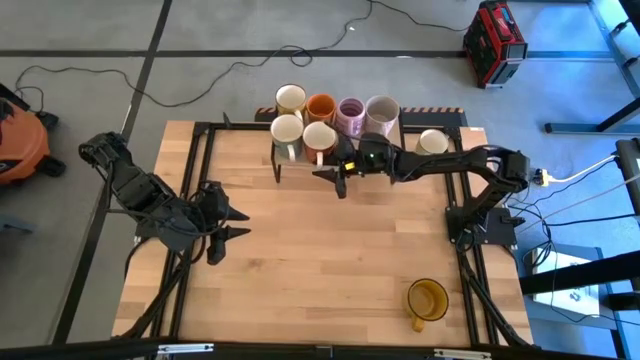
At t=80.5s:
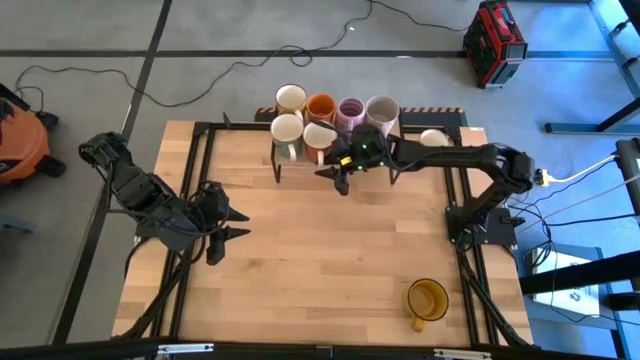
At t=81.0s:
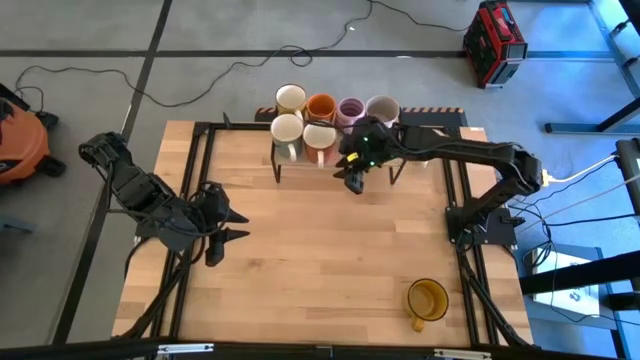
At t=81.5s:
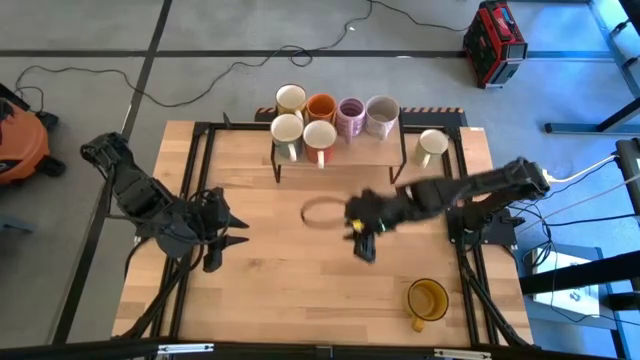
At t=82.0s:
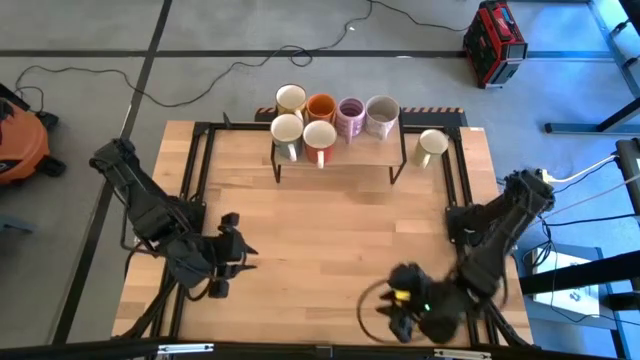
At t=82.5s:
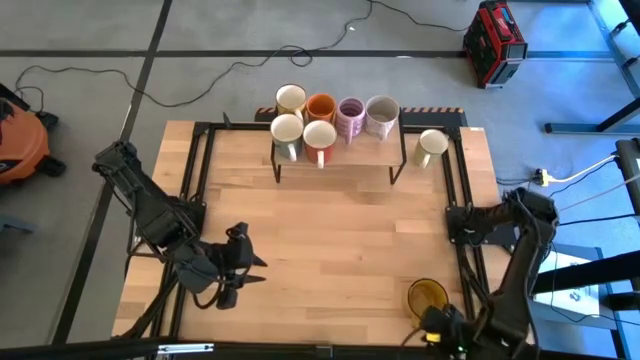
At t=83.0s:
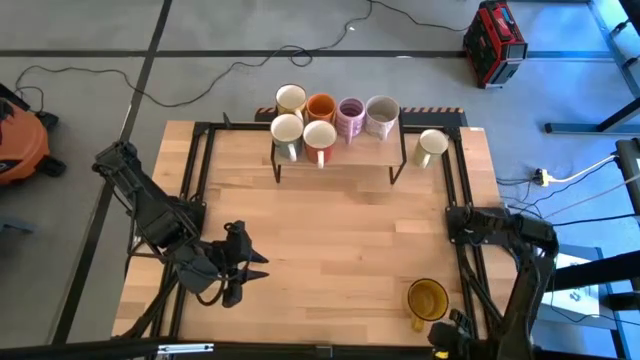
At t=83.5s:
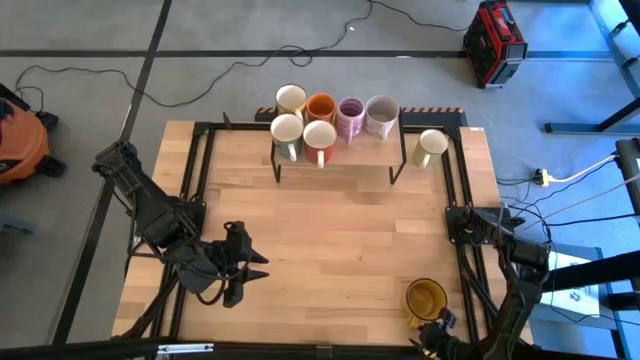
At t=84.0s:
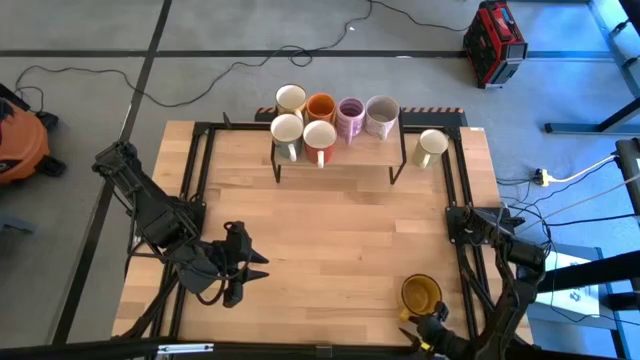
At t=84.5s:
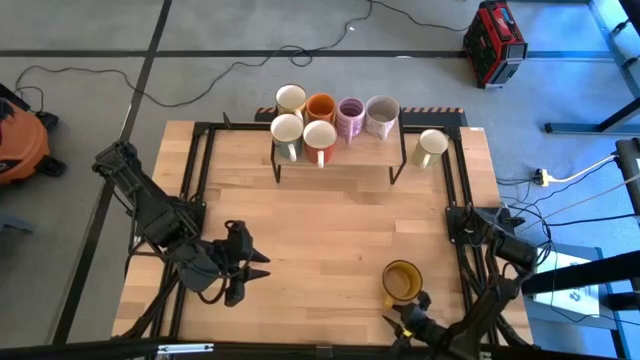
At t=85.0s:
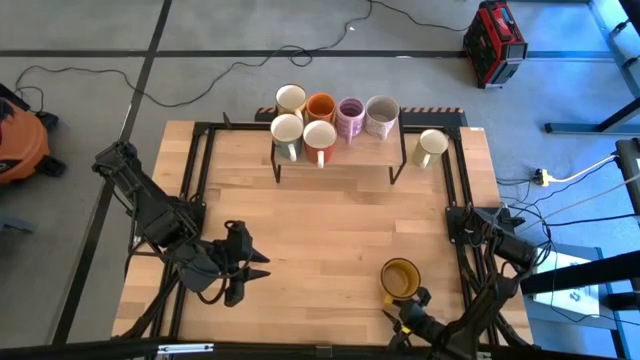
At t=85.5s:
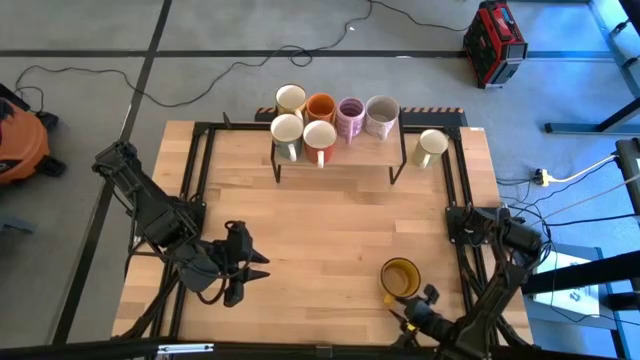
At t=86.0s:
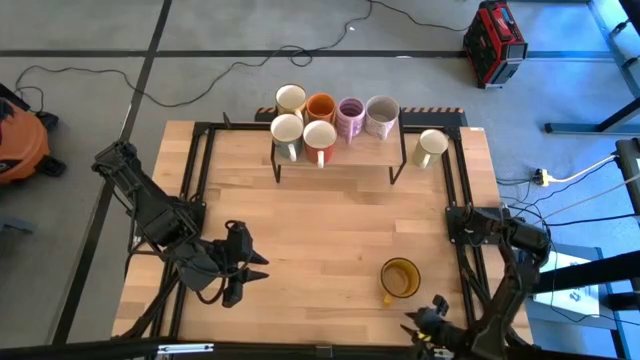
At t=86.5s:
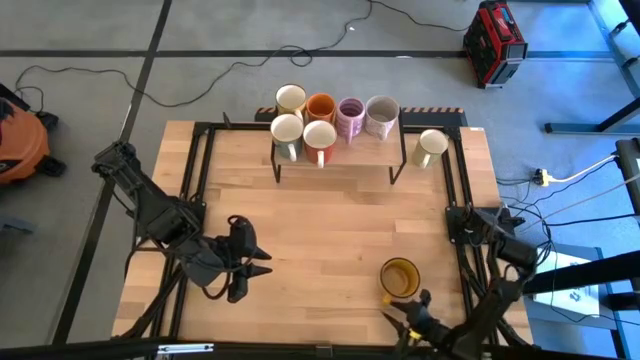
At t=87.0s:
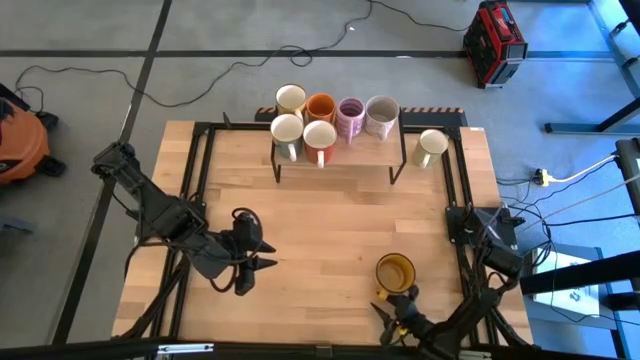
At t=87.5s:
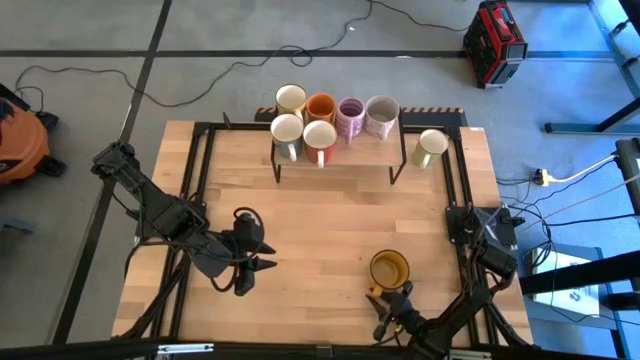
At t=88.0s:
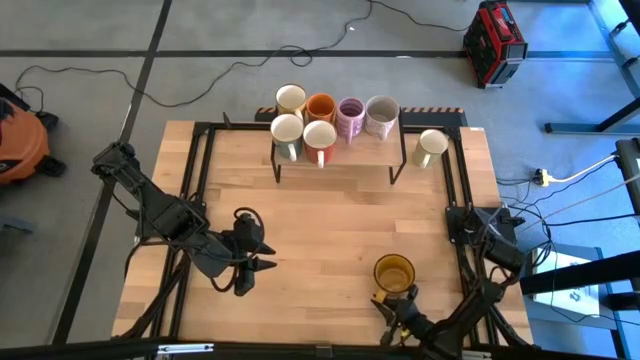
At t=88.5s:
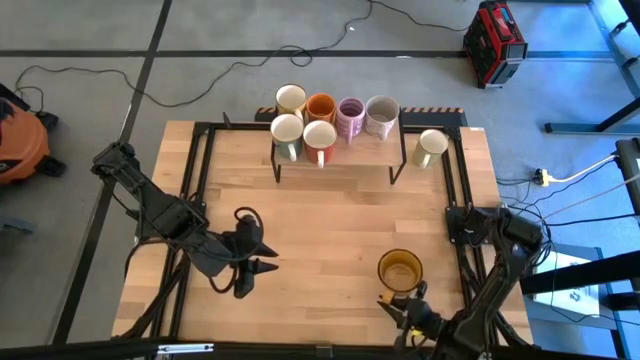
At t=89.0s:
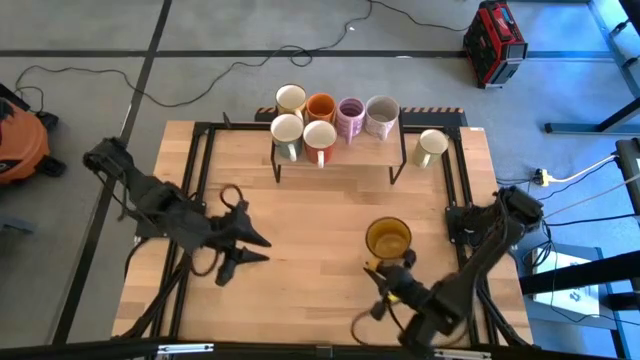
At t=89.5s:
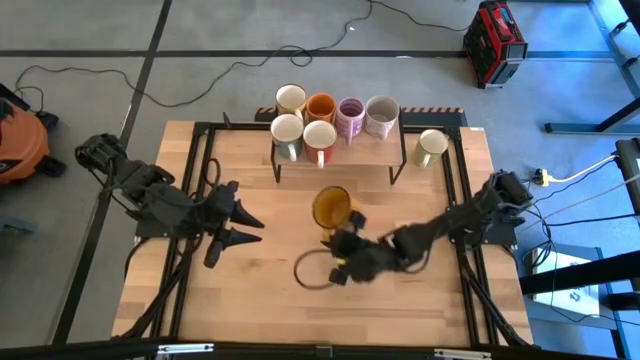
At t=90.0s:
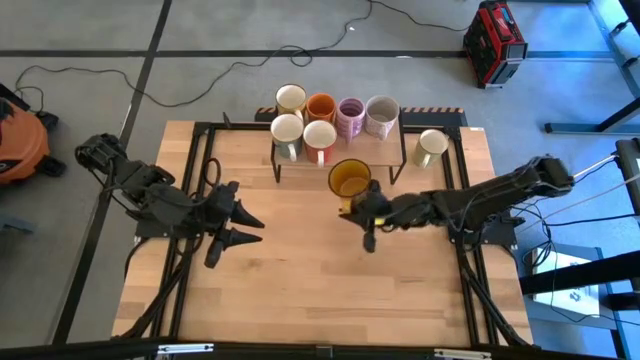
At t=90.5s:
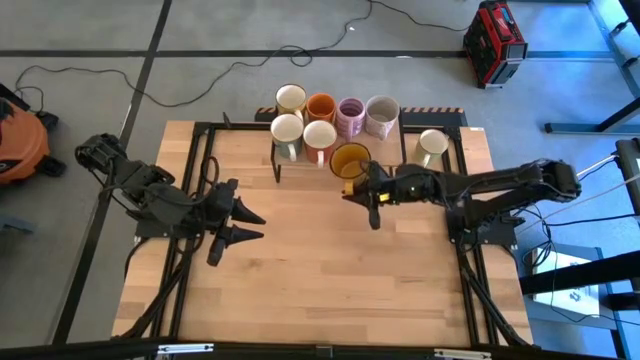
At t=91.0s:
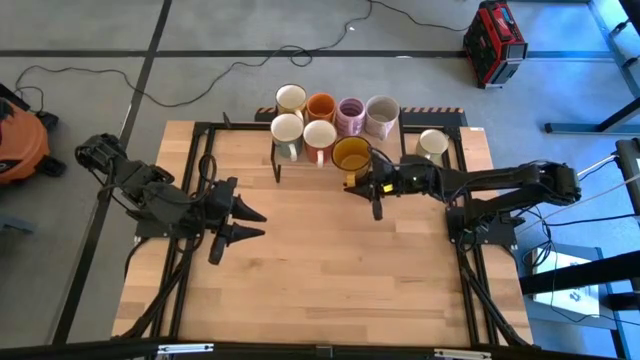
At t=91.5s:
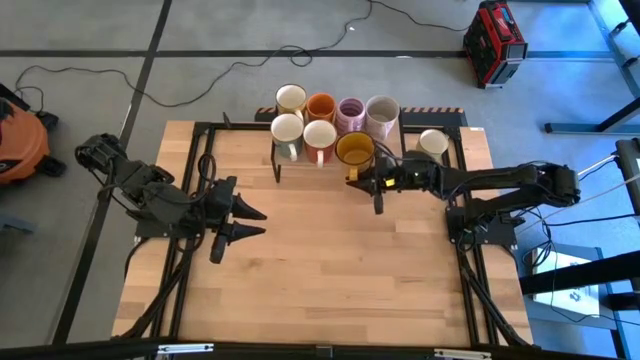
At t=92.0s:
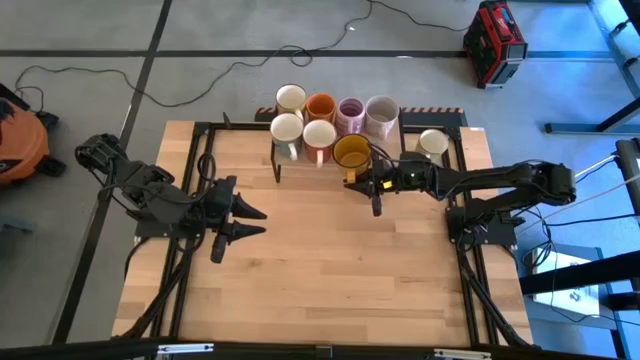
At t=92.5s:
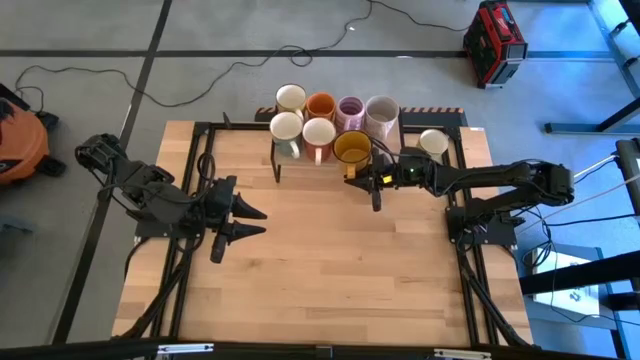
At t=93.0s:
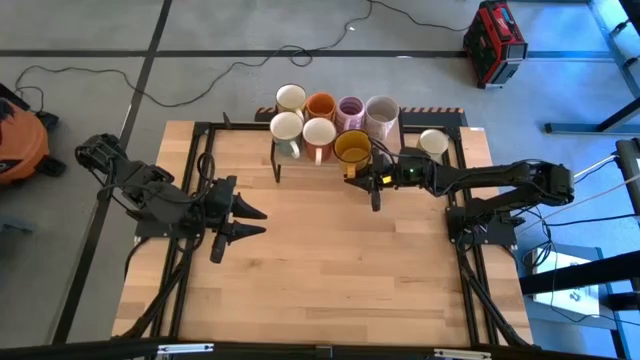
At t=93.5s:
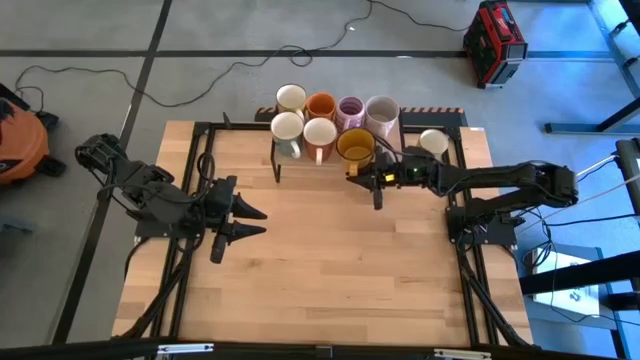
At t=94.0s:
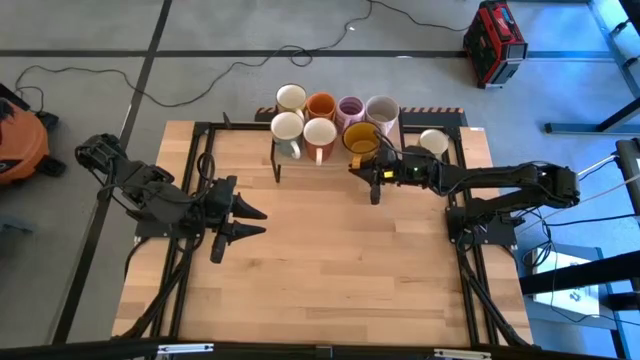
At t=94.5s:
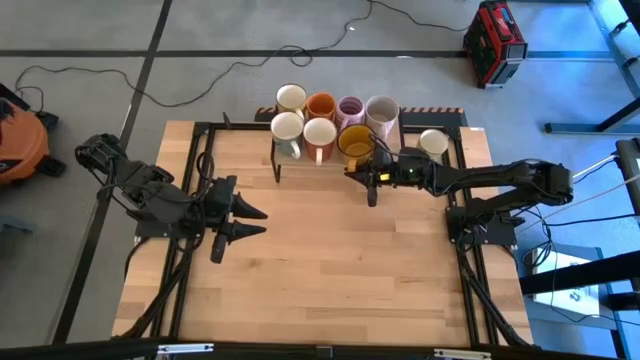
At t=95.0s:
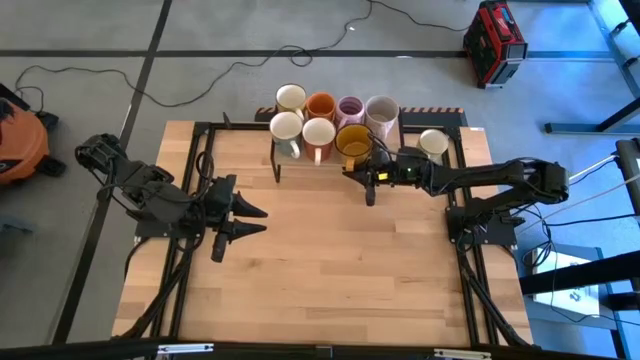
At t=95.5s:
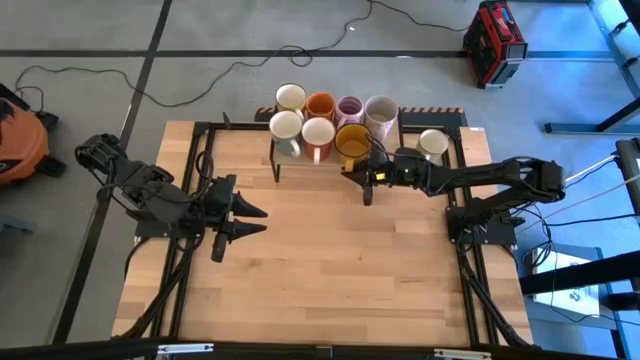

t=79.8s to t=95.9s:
Task: Place coffee mugs
Put the yellow mug on the shelf
